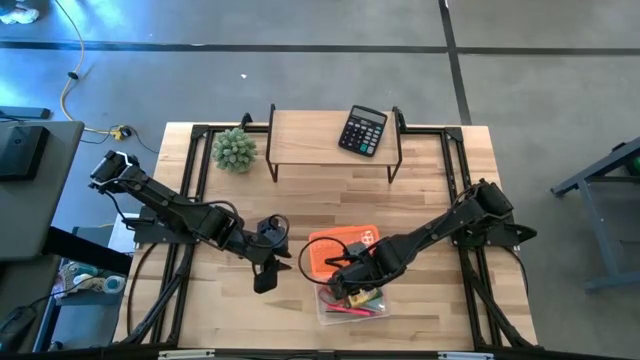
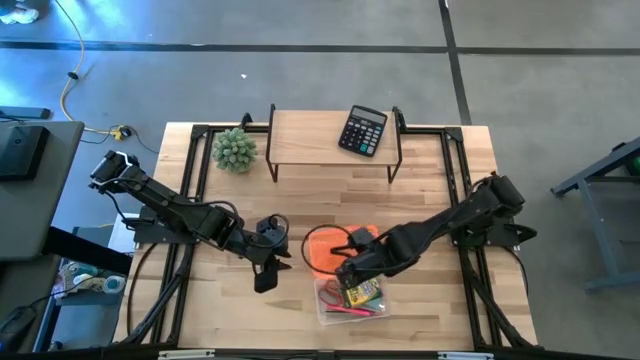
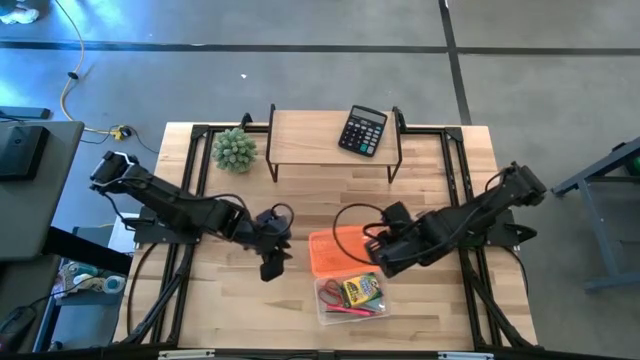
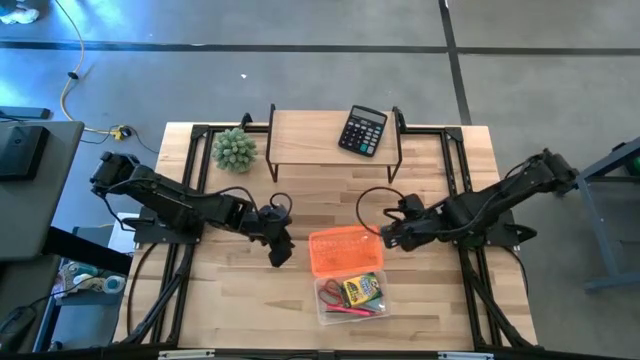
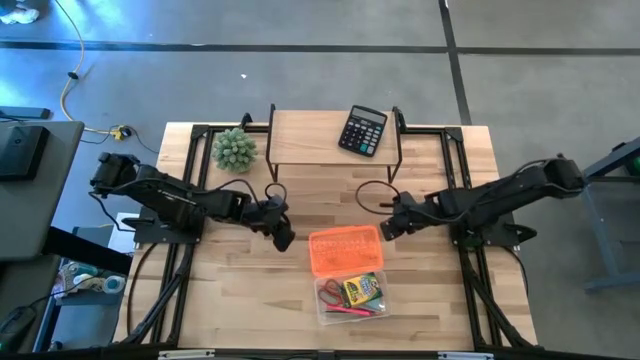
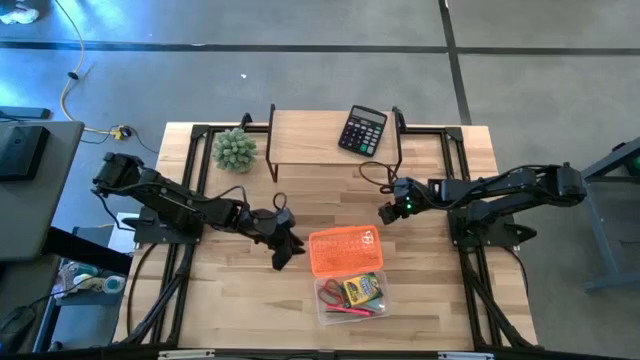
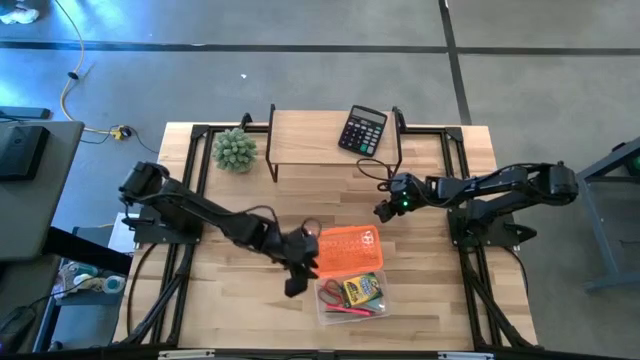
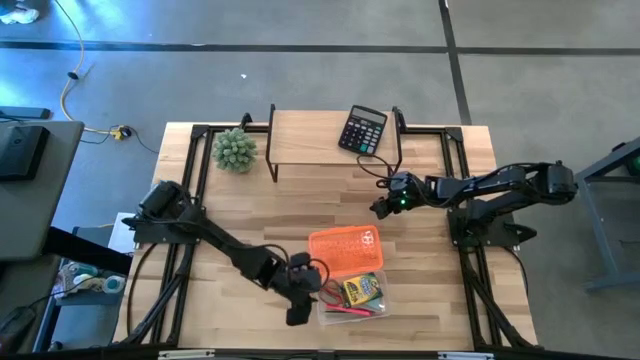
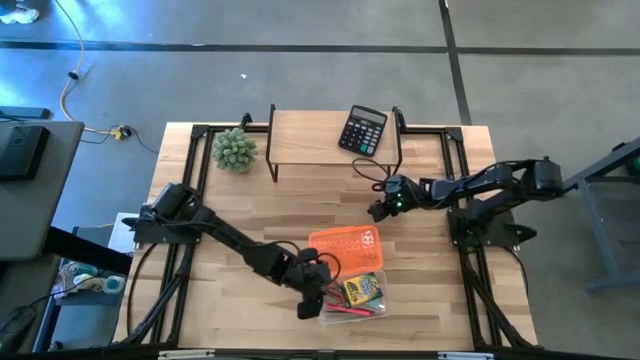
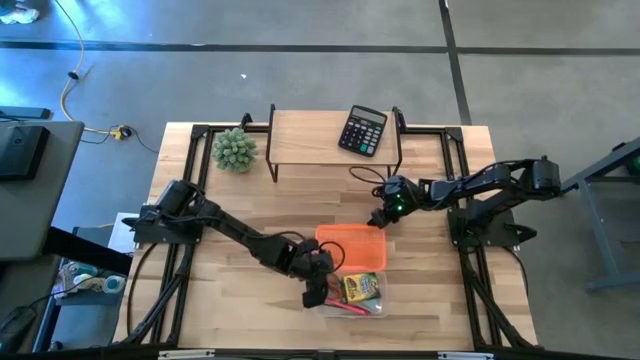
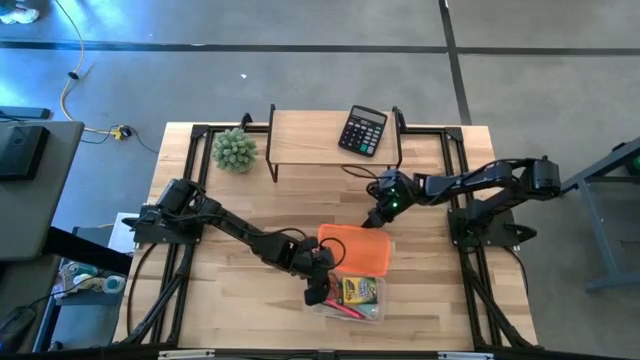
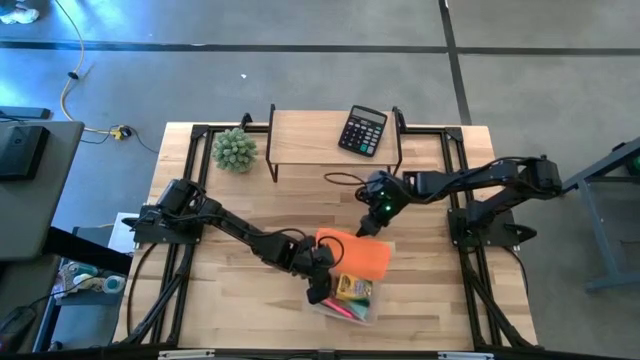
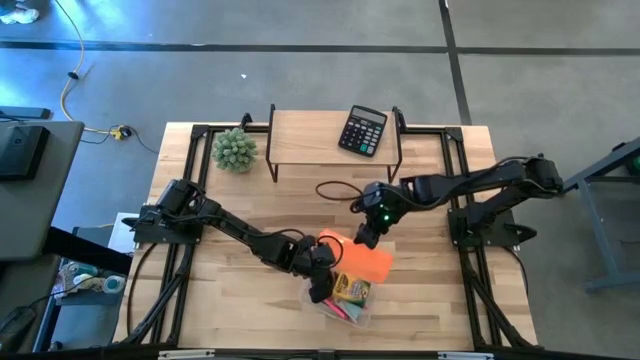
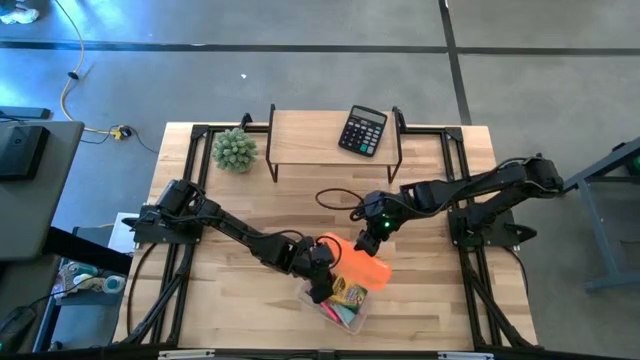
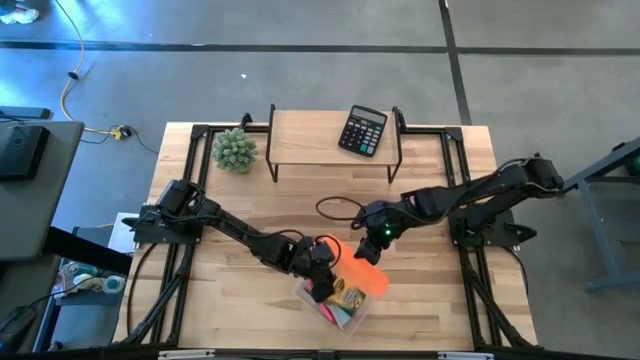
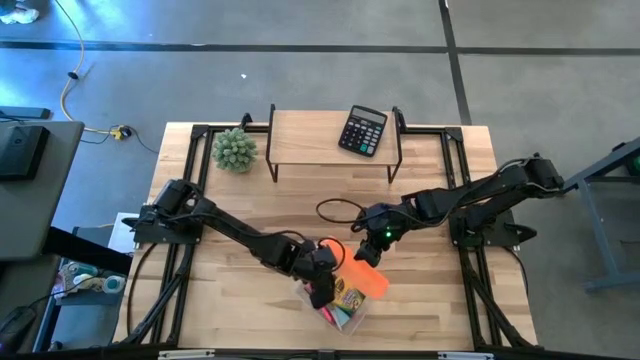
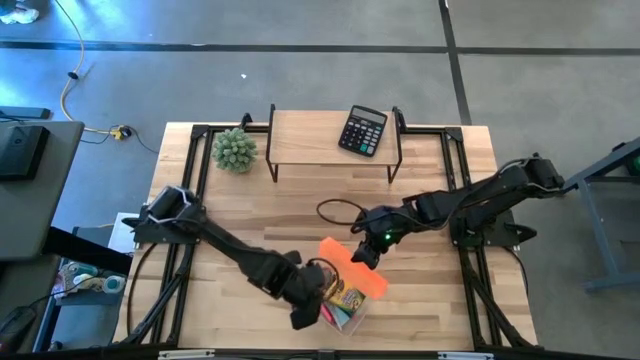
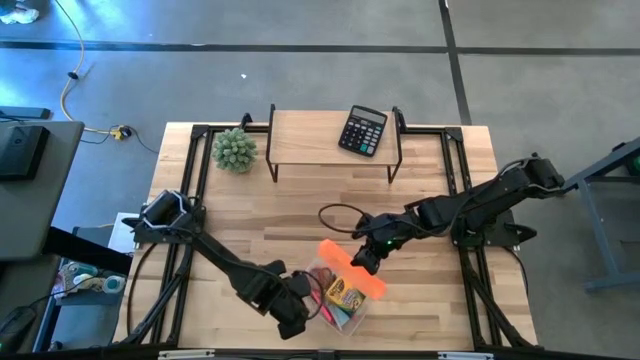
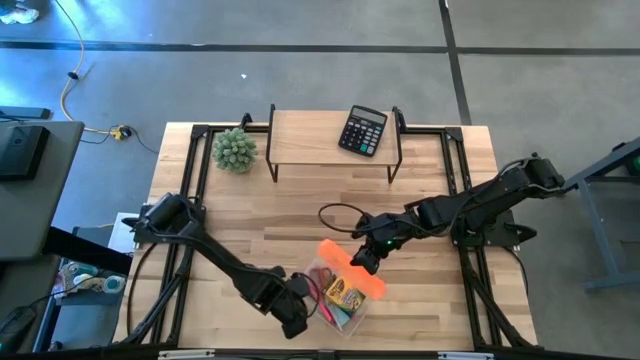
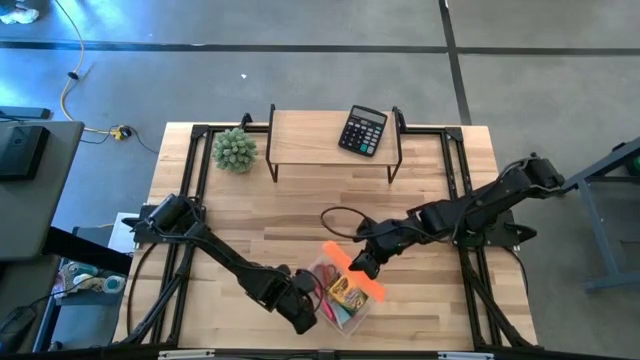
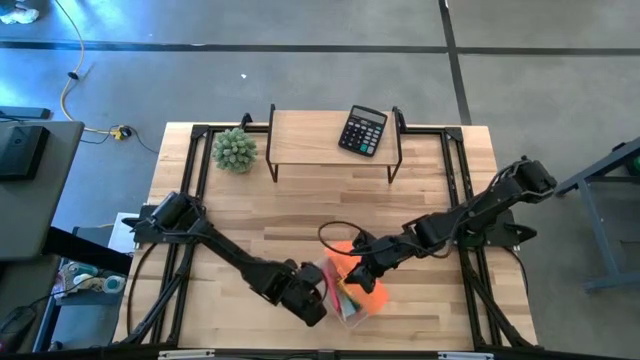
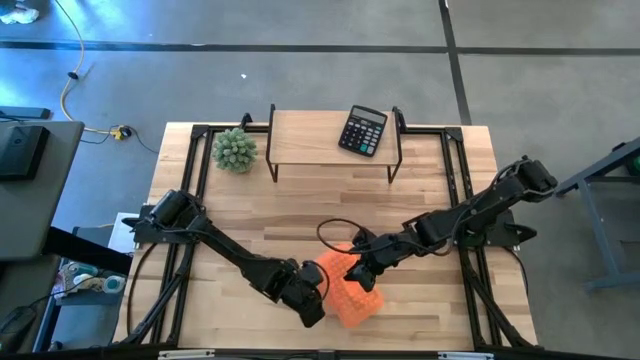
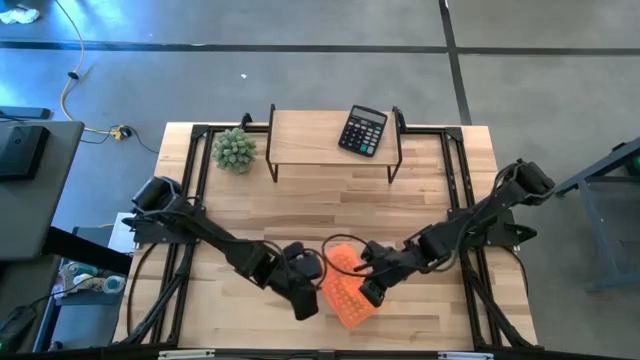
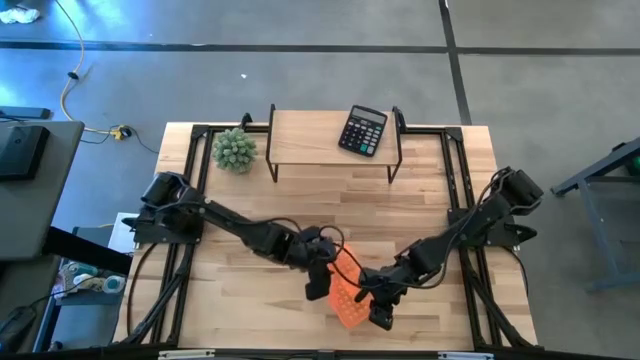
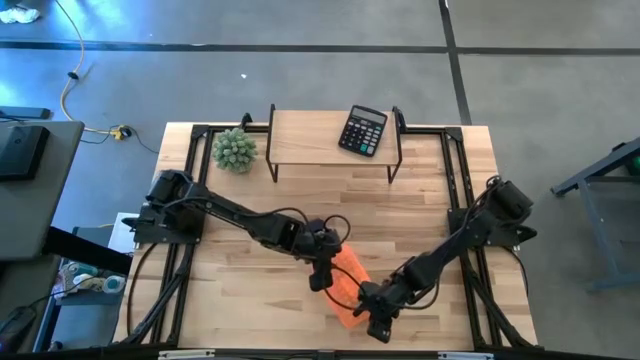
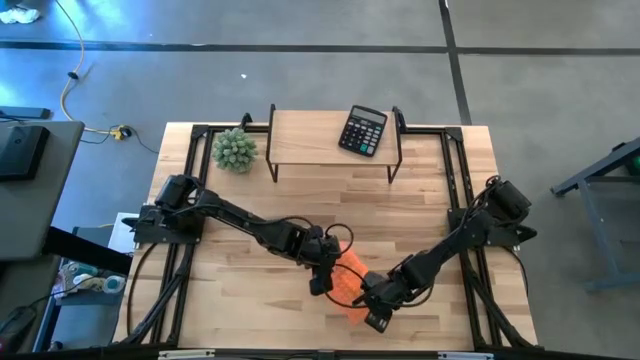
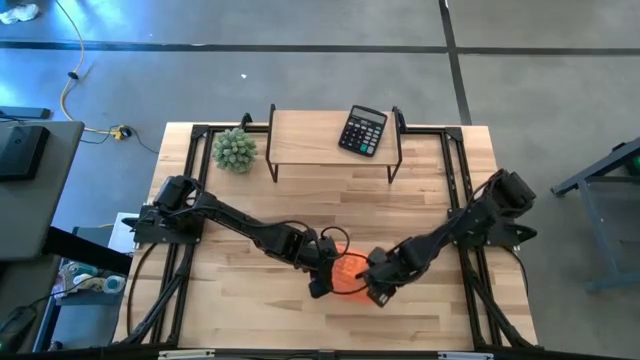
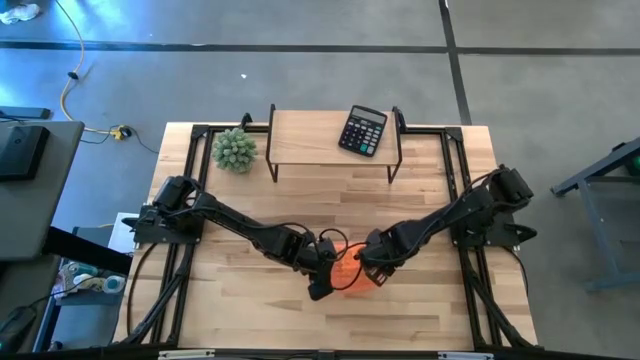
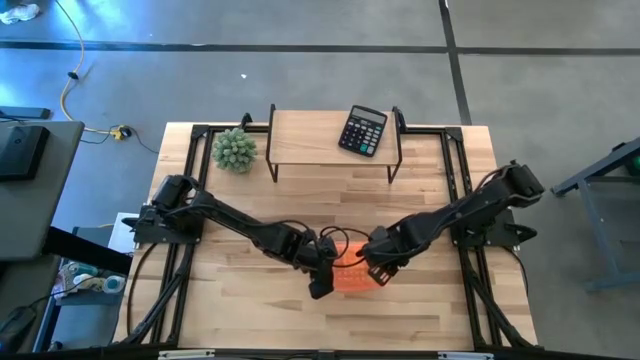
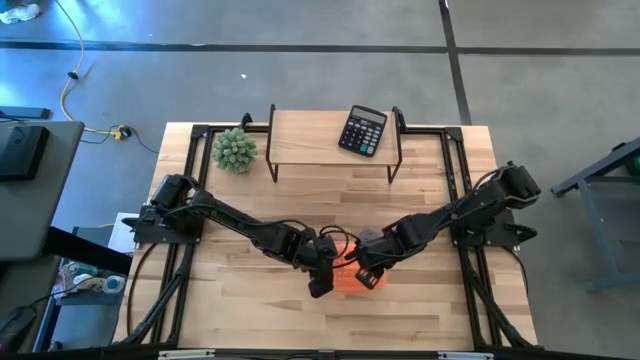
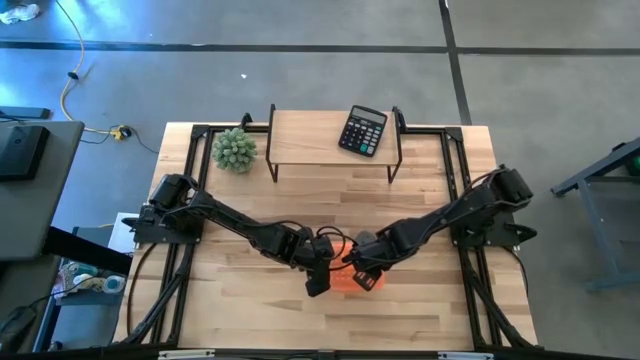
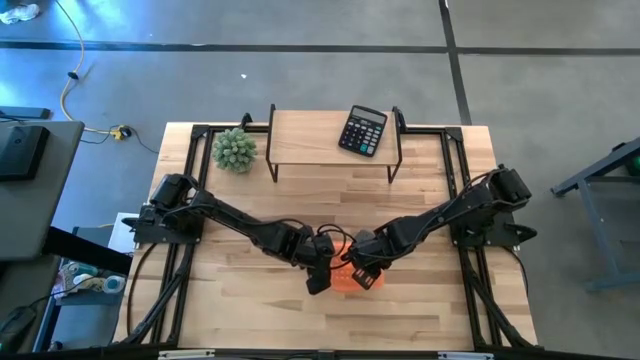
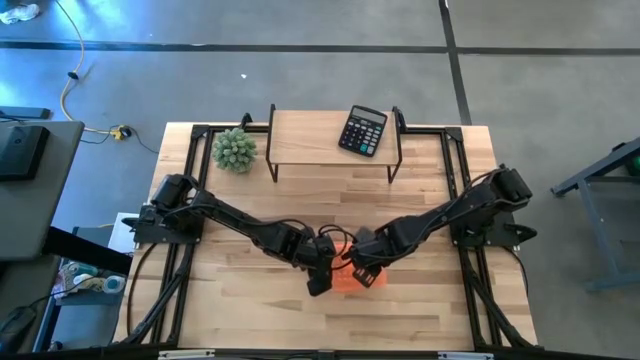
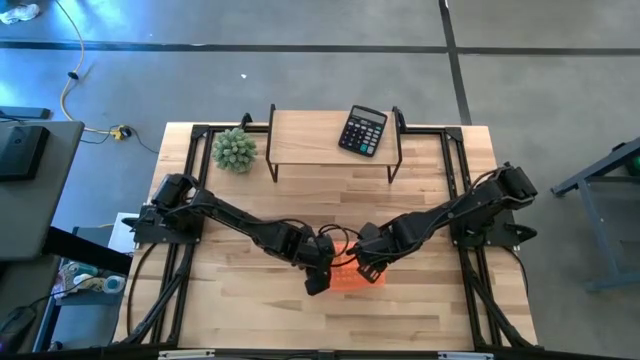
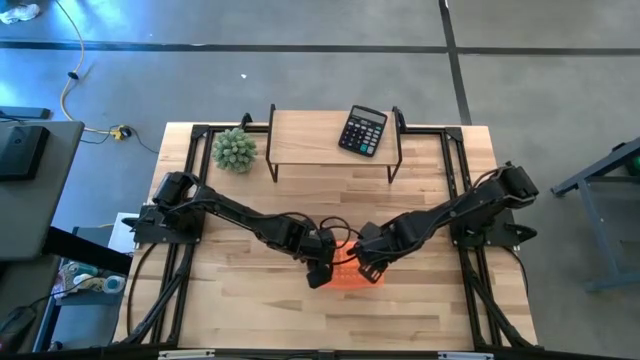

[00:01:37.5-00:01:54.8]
Task: Pack school essentials
Close the orange supply box

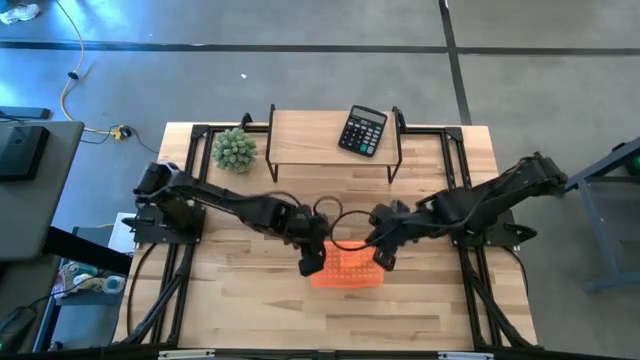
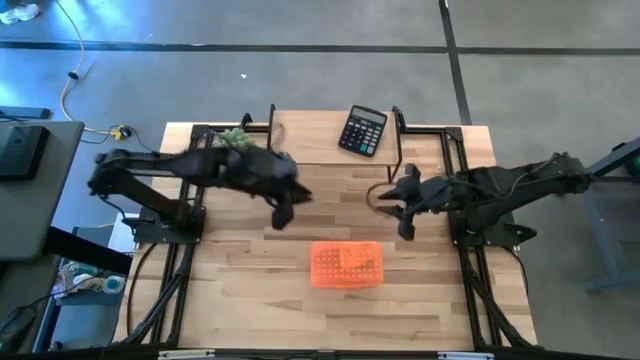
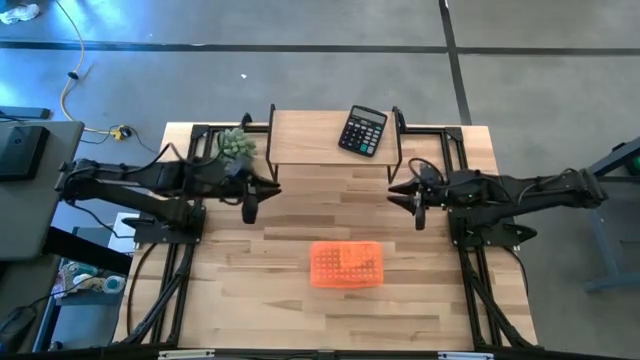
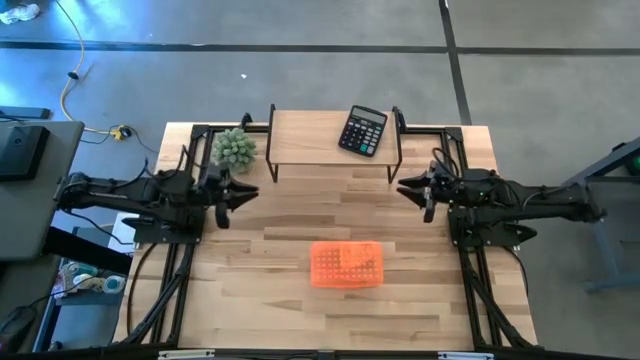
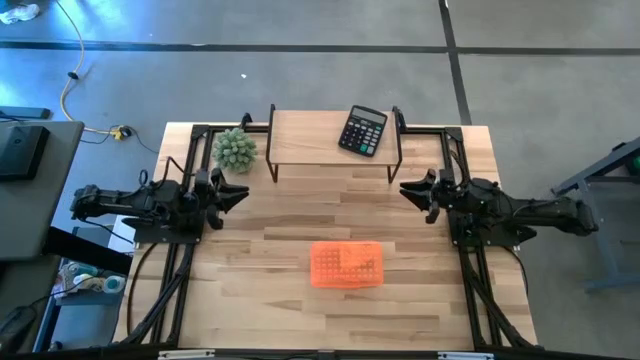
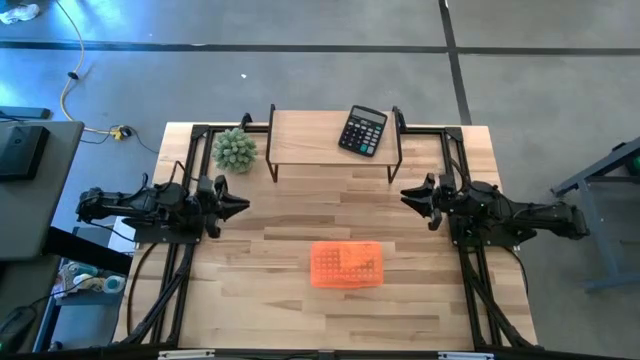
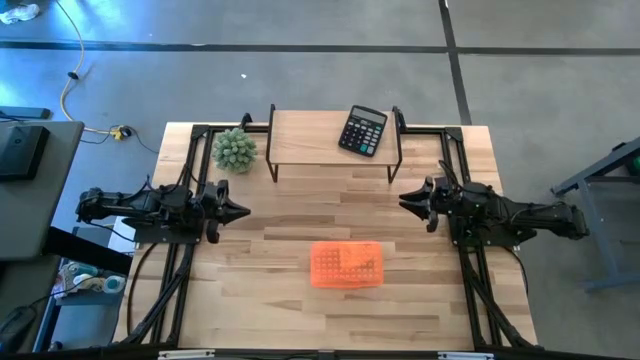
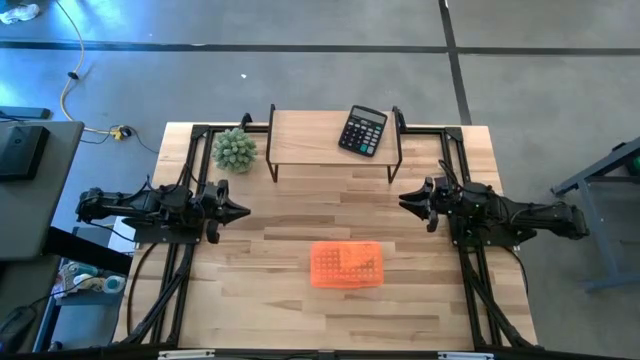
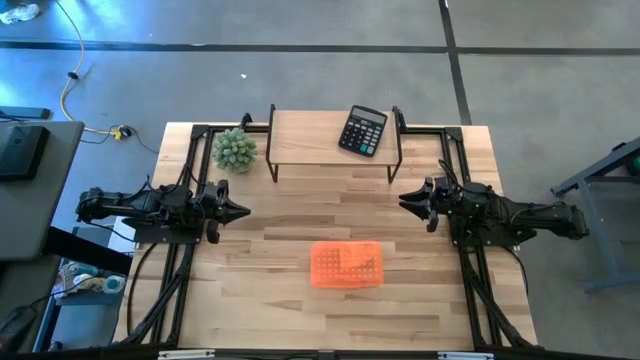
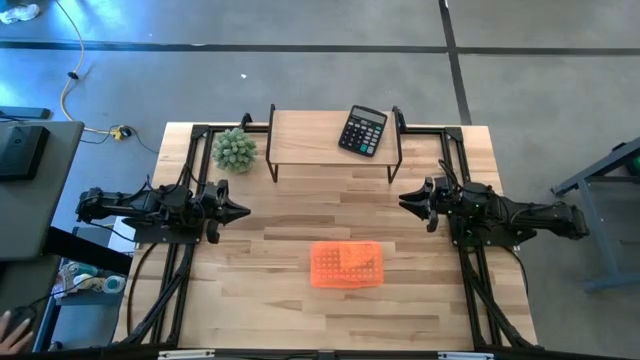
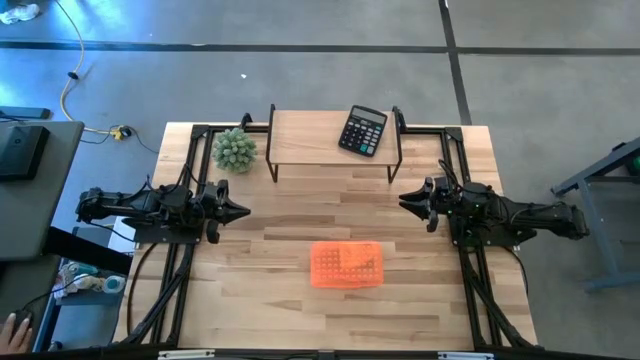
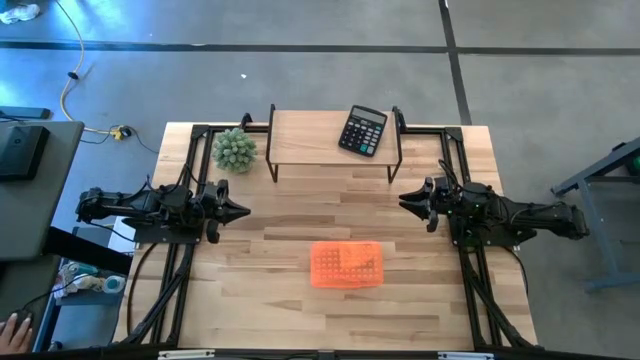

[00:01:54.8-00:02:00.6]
Return to Home Position
